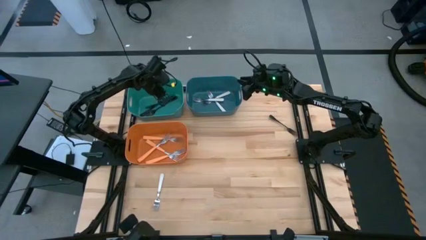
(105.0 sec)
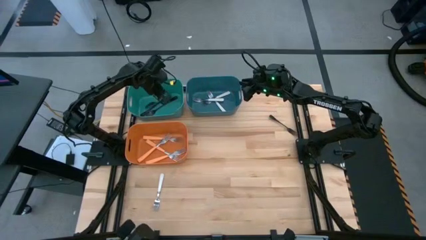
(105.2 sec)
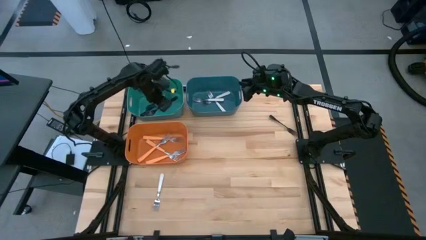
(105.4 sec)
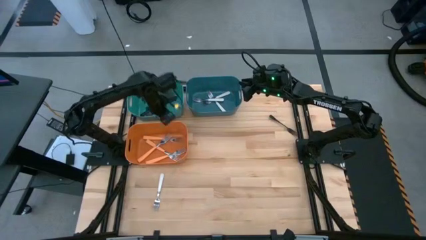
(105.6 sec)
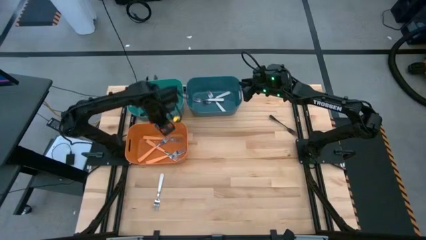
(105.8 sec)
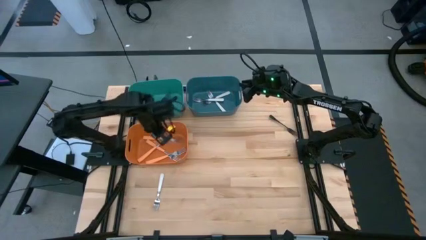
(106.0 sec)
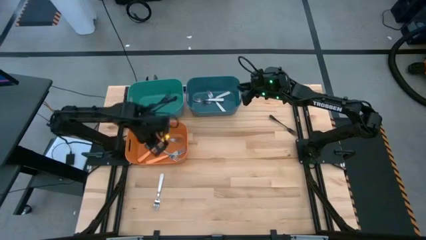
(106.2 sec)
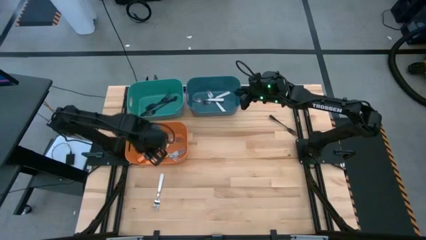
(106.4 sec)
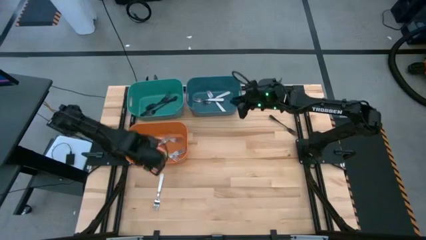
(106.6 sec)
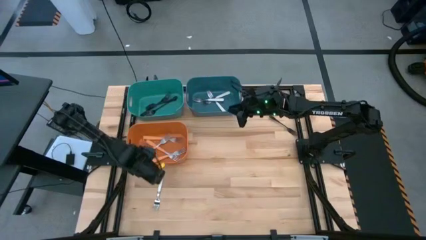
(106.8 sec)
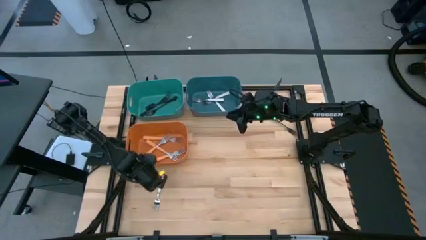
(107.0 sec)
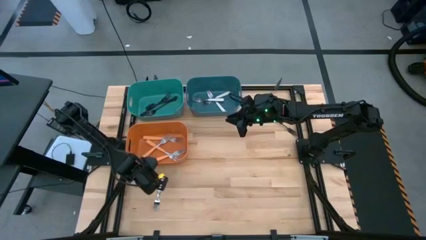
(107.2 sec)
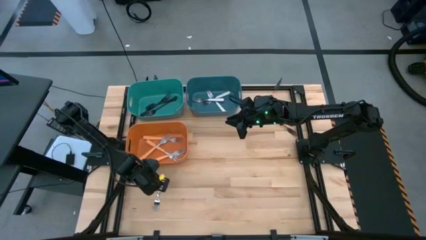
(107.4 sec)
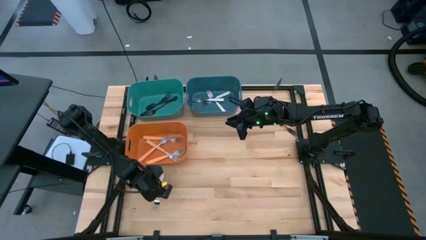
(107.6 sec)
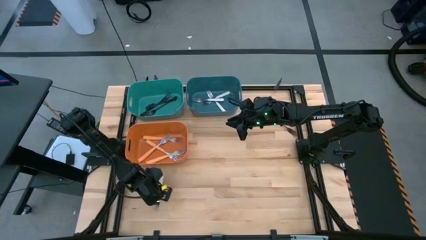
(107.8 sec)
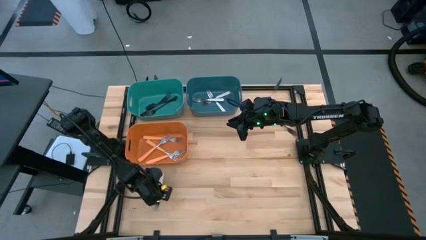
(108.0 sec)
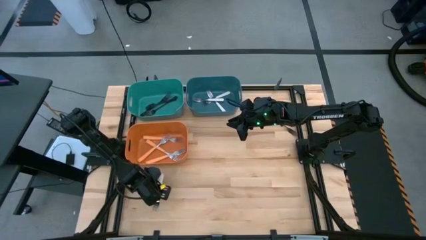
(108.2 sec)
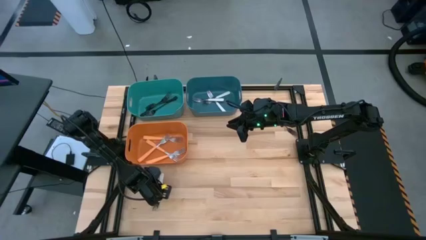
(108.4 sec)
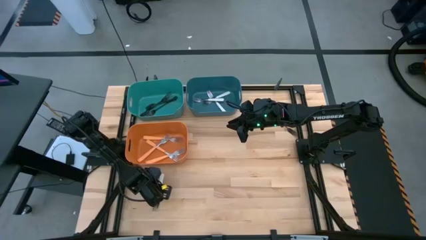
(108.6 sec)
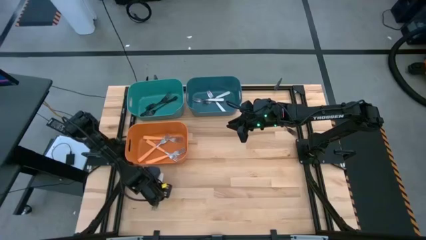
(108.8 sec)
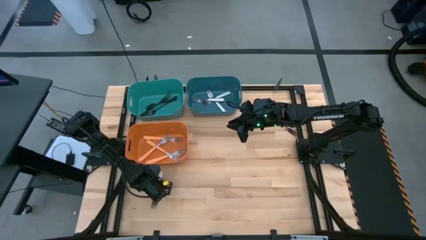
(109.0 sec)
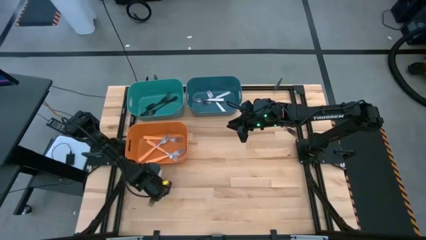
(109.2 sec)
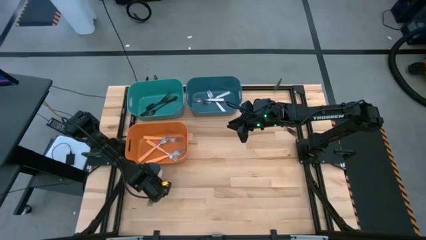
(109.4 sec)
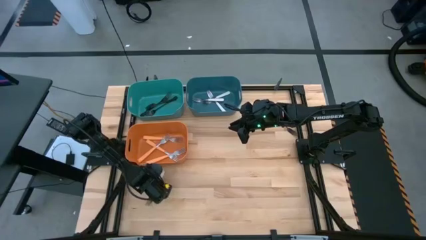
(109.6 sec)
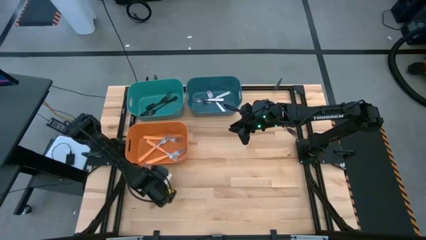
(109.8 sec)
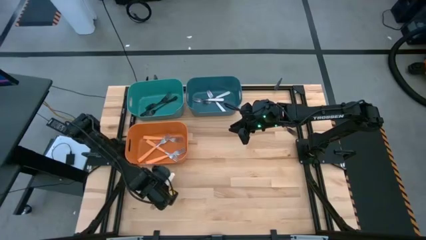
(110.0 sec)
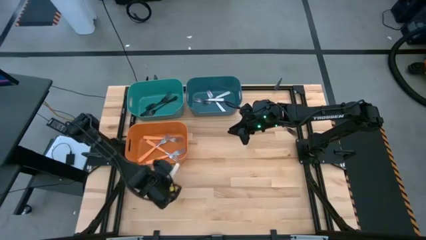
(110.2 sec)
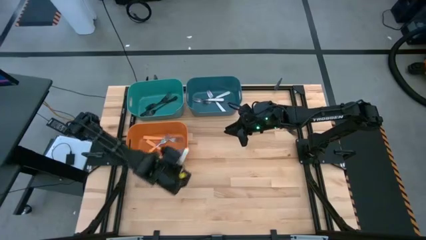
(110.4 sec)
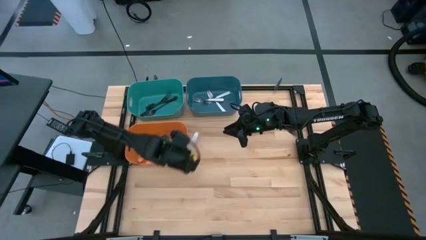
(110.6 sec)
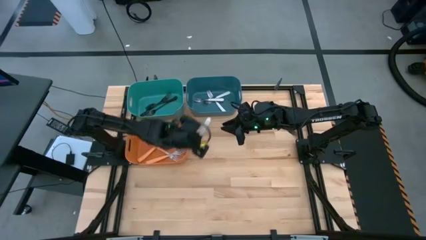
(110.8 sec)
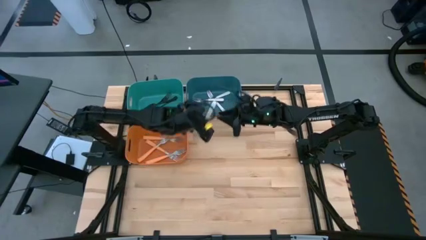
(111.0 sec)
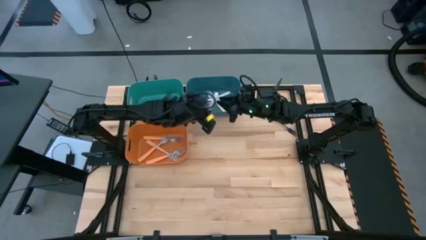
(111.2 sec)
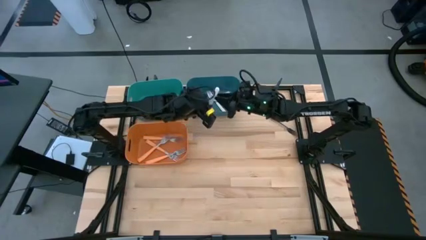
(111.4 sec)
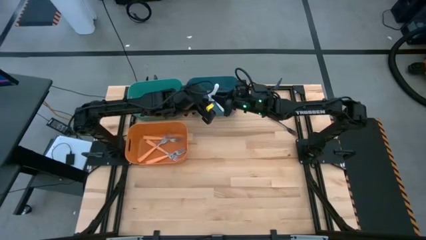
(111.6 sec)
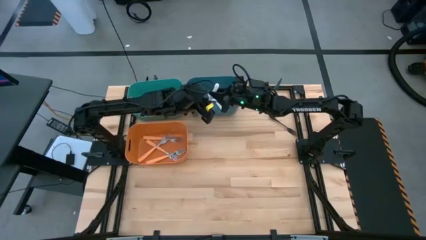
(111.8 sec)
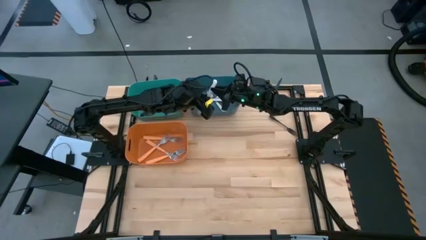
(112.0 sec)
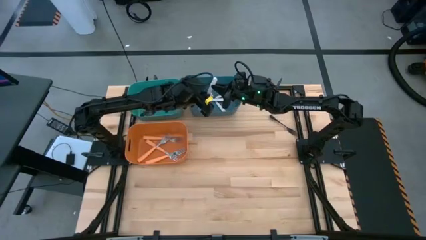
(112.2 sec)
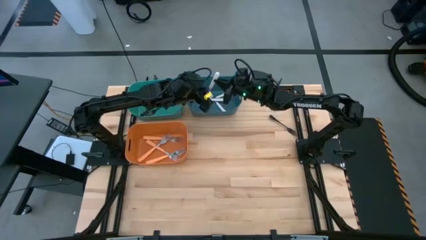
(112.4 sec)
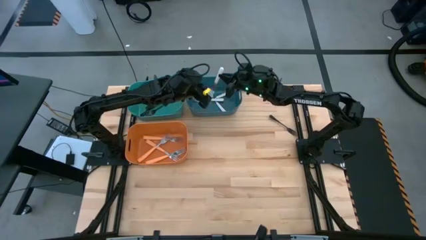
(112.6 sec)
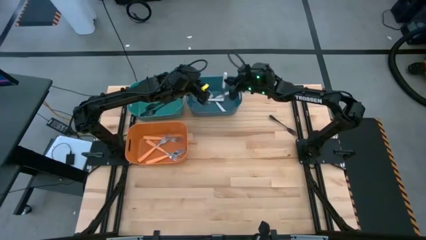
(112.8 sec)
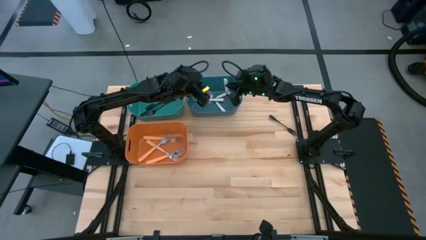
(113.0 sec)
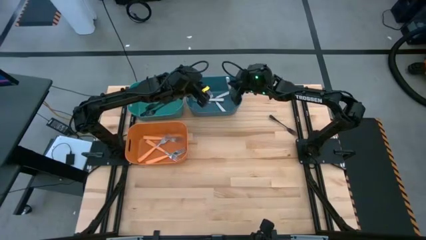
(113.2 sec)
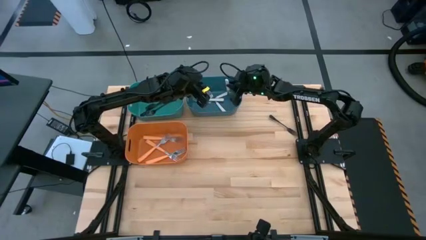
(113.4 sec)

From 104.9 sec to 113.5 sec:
Task: Sort silverware by color (type)
Put the white fork into the blue bin

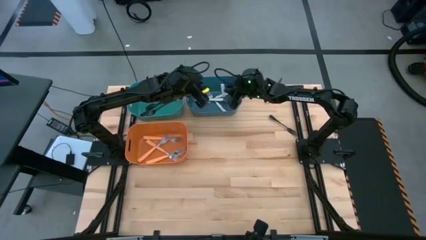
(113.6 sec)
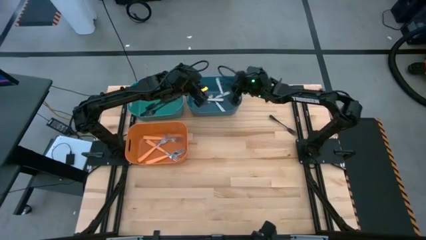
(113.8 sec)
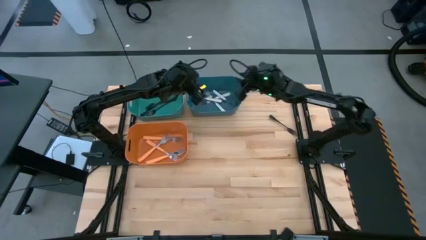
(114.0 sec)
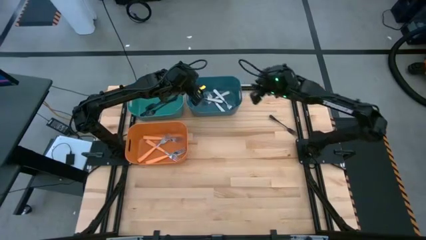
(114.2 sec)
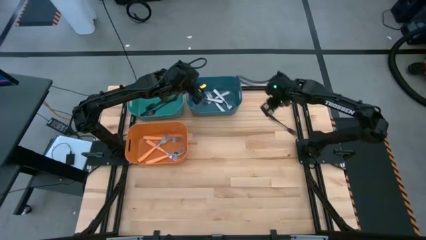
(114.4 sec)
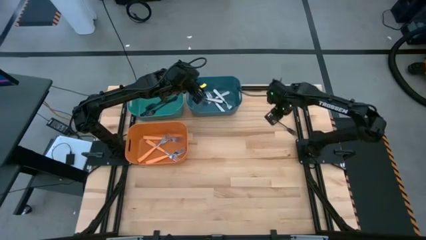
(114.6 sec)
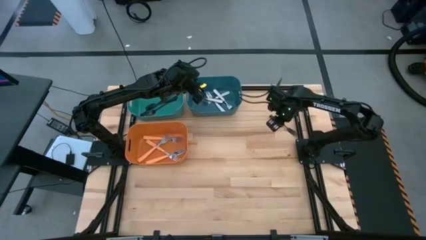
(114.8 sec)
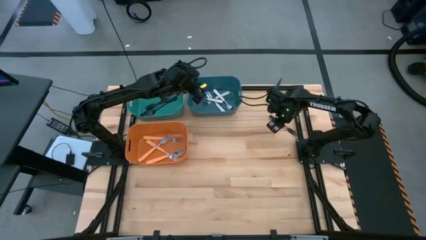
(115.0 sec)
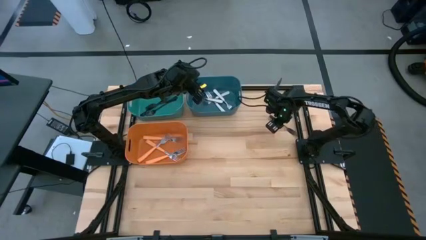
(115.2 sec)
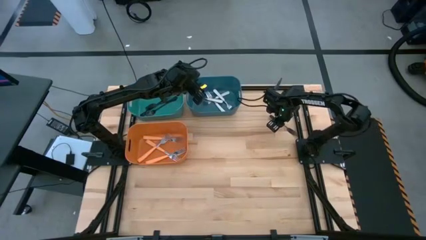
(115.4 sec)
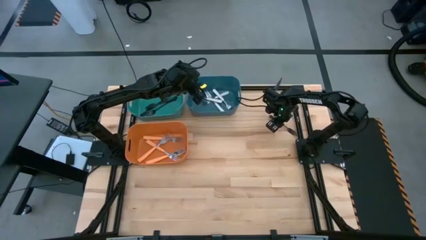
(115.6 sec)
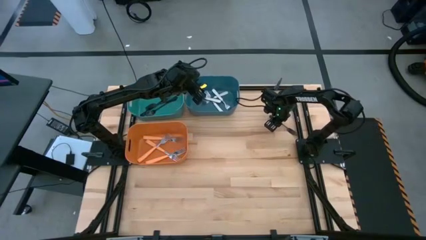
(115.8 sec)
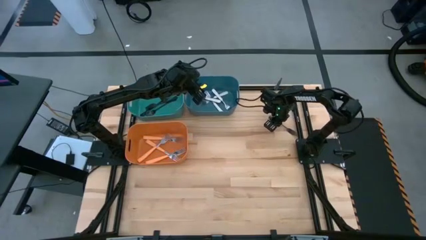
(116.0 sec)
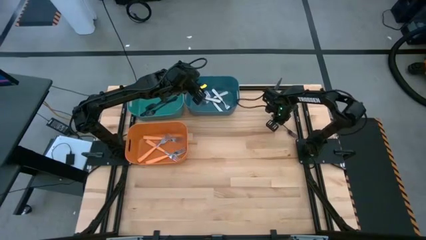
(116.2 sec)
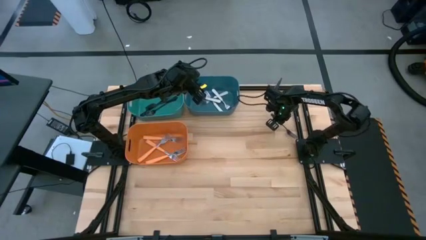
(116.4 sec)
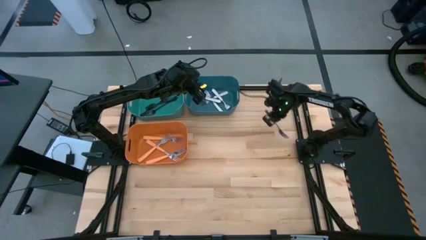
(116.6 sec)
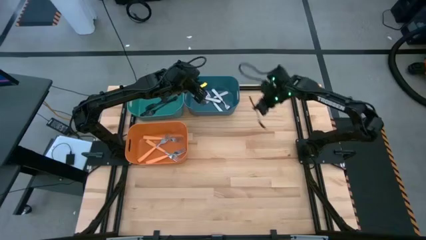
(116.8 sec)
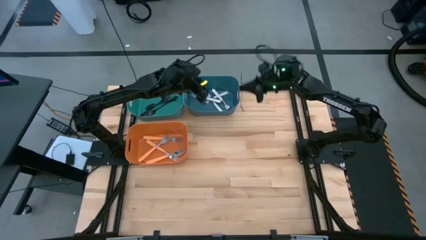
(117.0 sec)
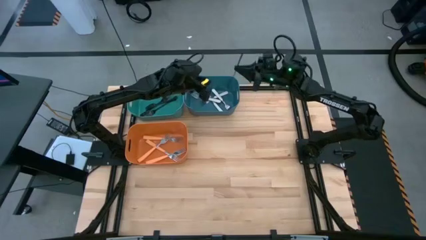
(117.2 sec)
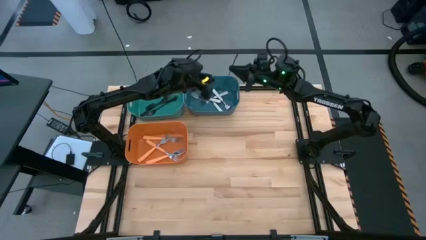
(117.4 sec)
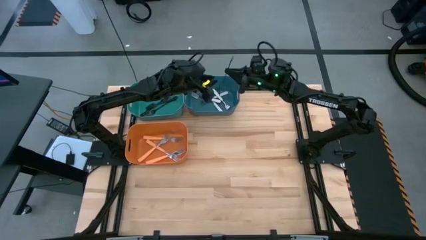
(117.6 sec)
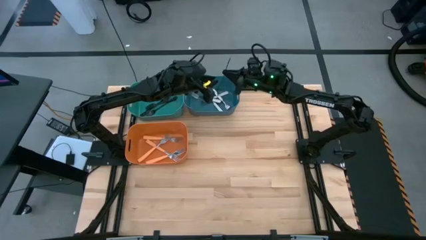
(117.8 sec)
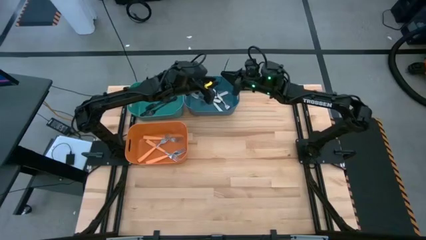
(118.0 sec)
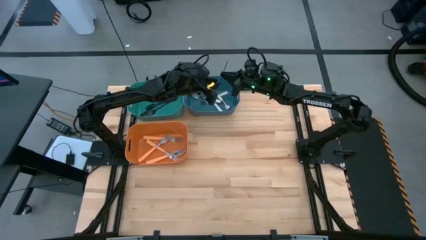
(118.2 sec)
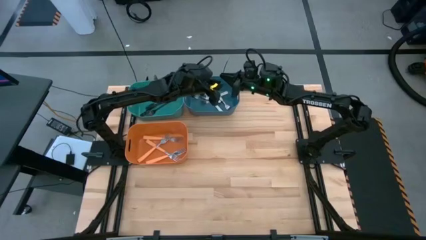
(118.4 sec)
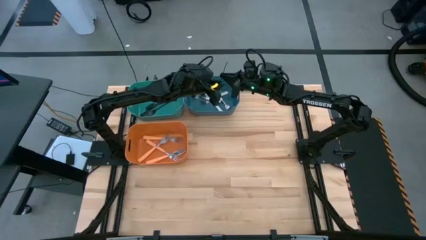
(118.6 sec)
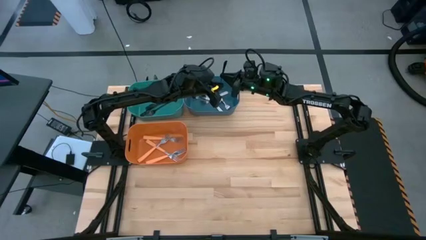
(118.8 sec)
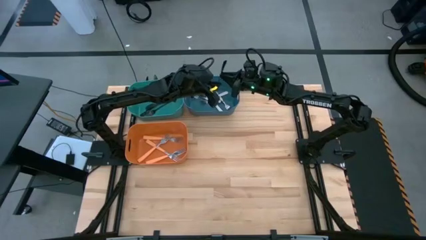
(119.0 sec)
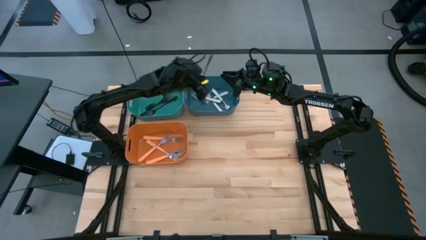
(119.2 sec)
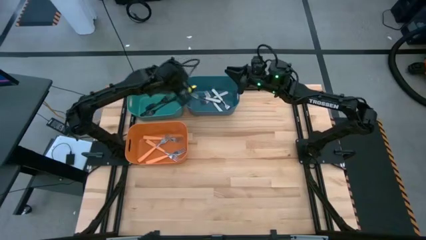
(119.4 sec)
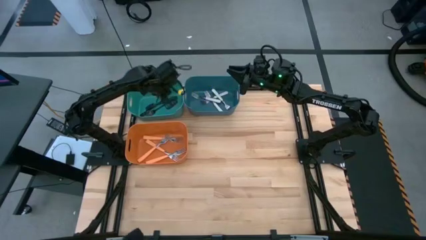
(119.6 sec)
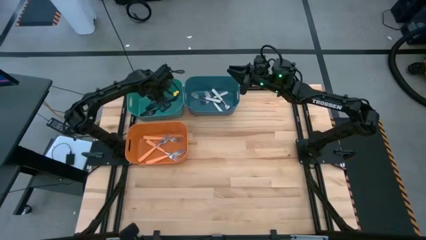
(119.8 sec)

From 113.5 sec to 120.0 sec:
Put the black fork into the green bin
